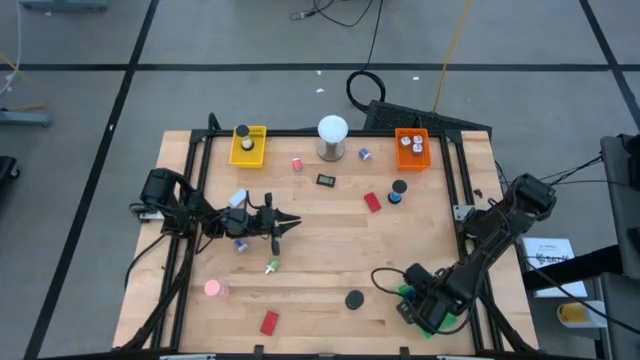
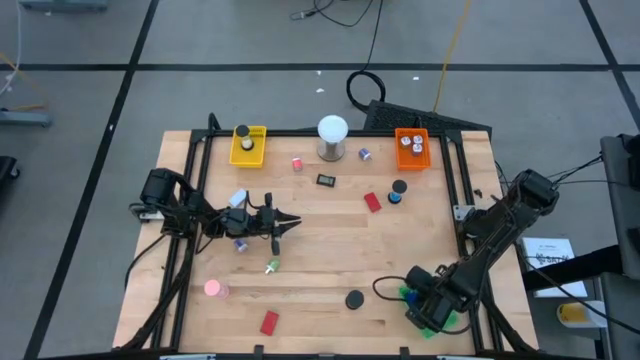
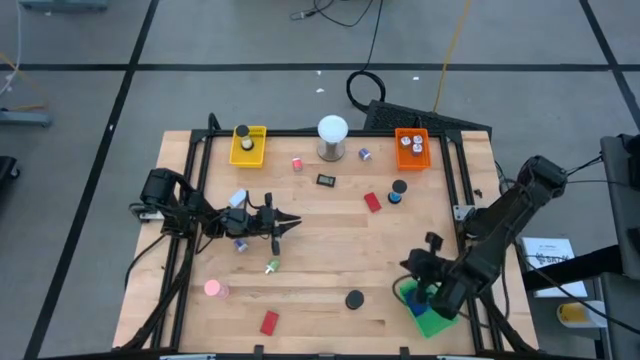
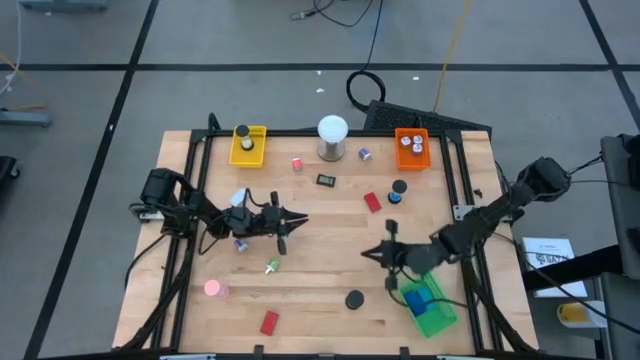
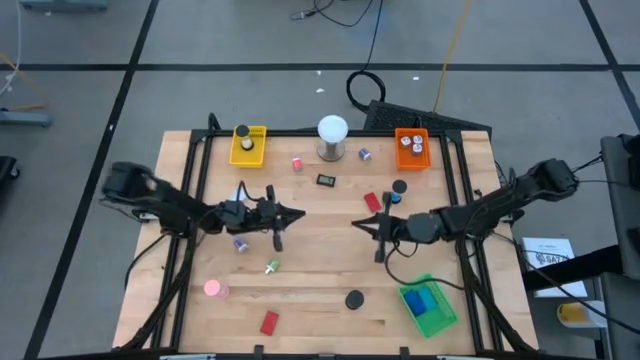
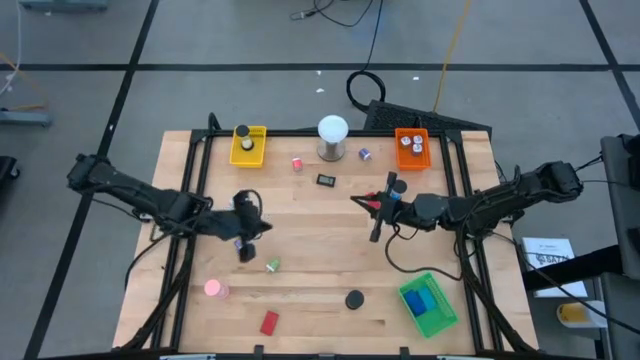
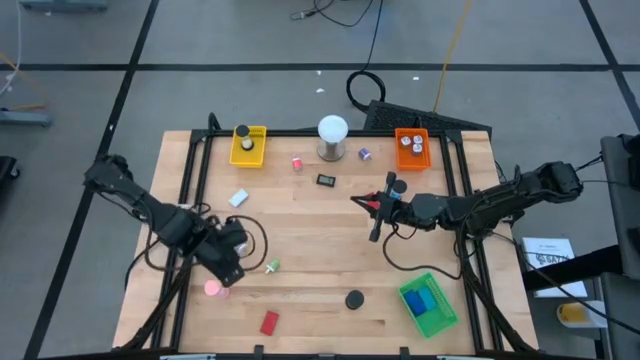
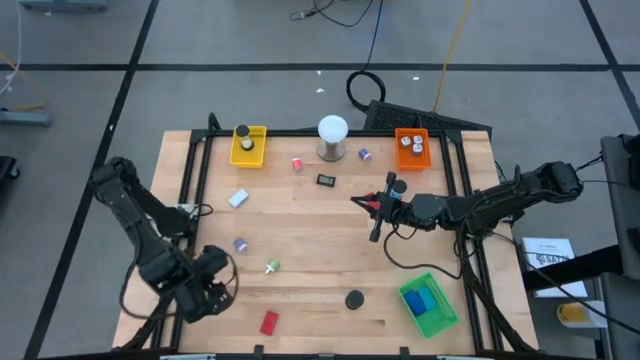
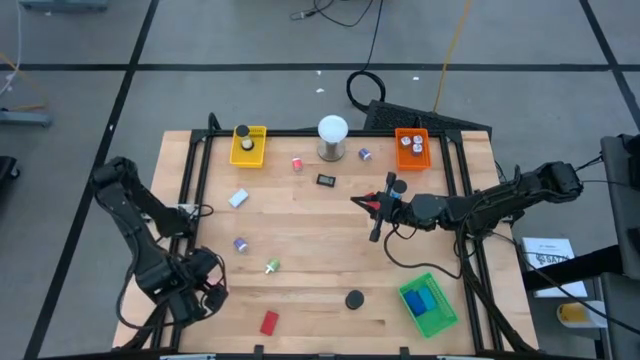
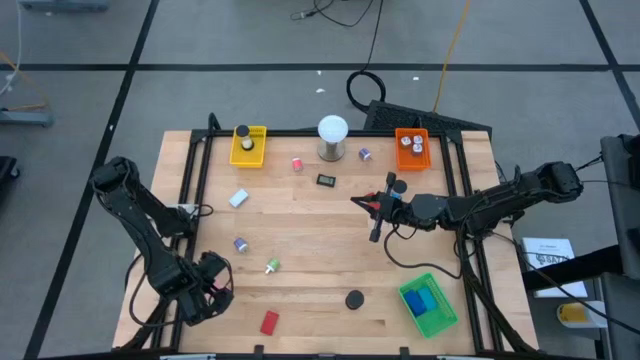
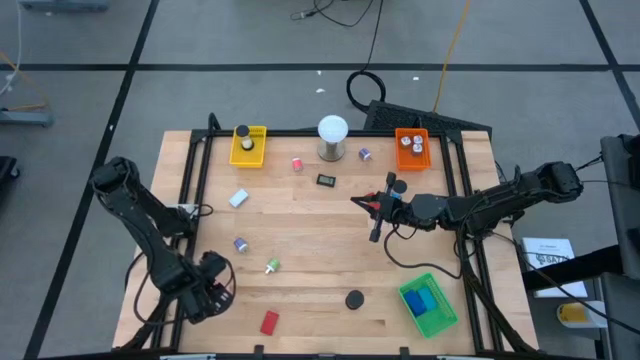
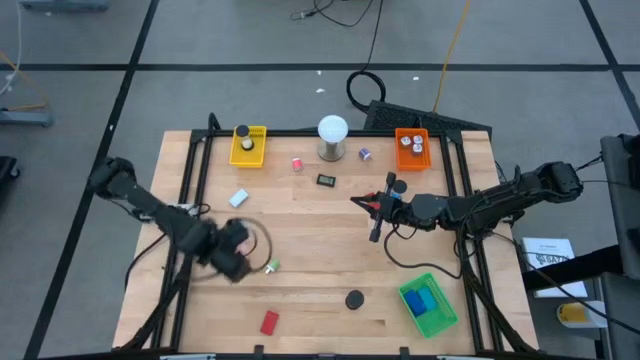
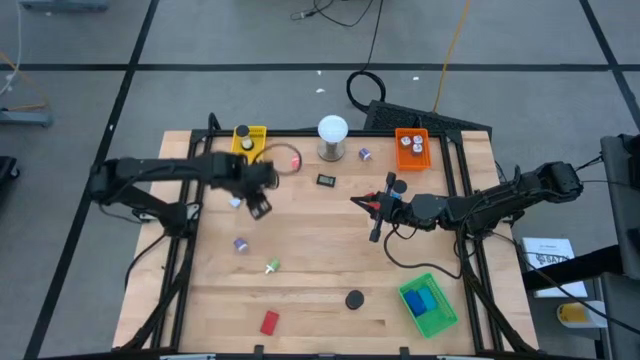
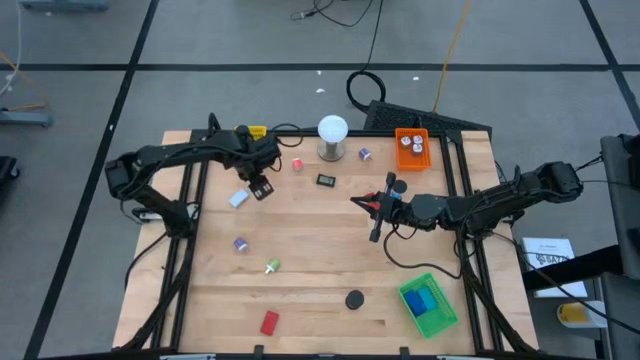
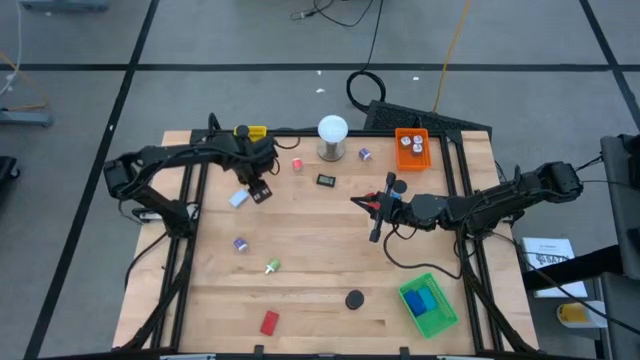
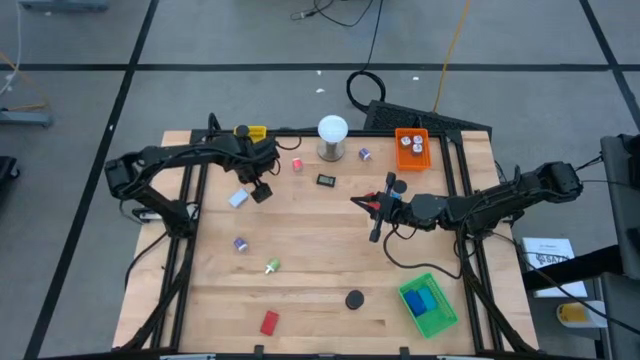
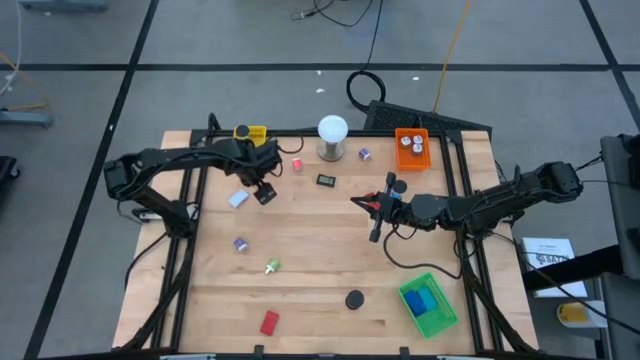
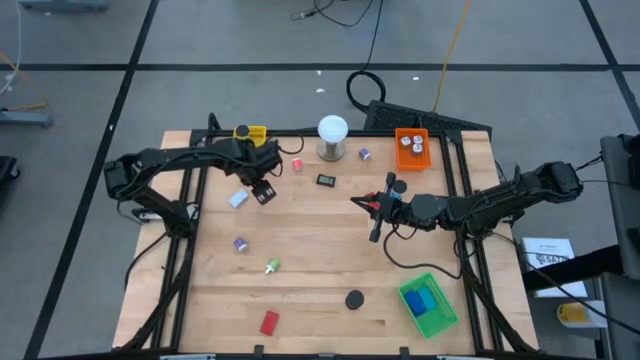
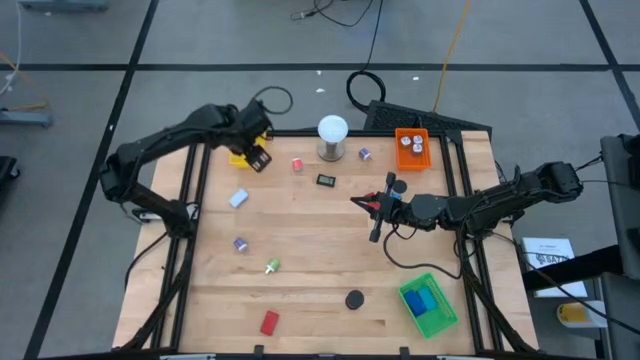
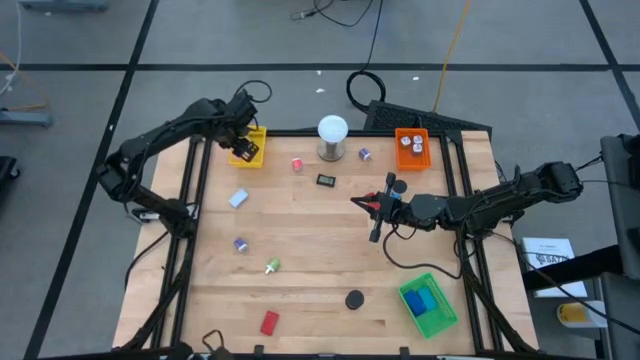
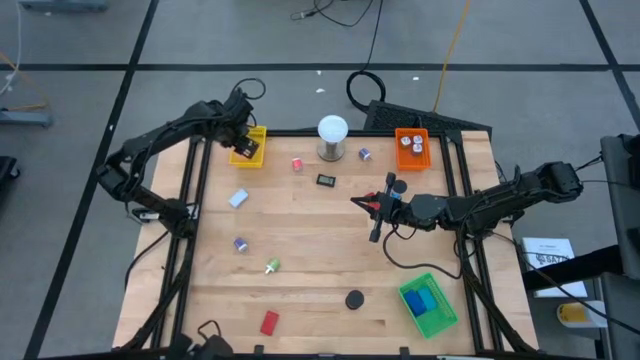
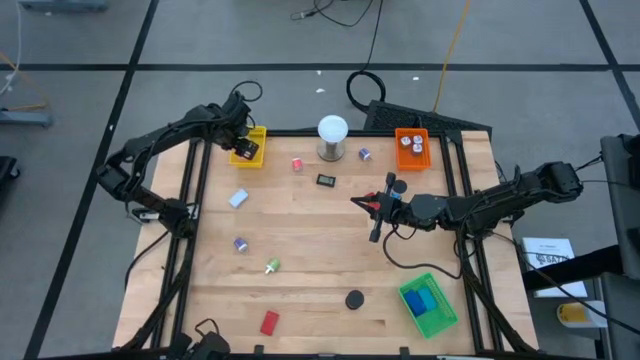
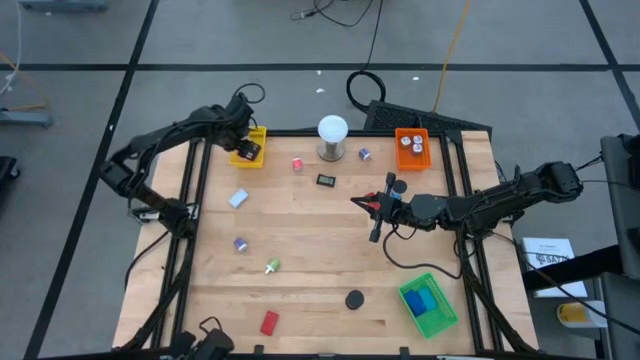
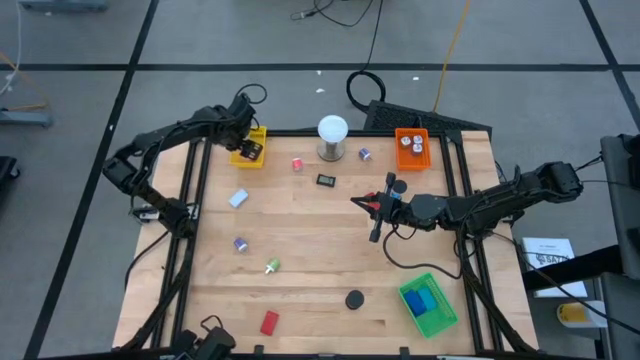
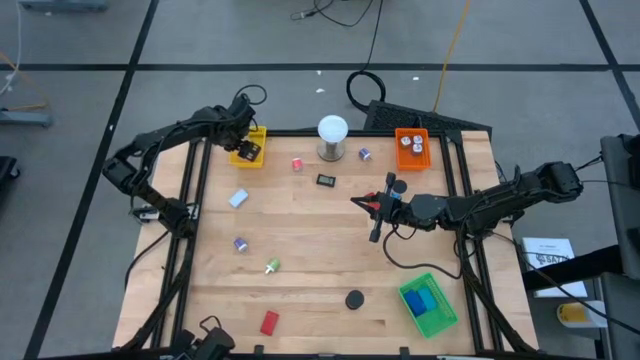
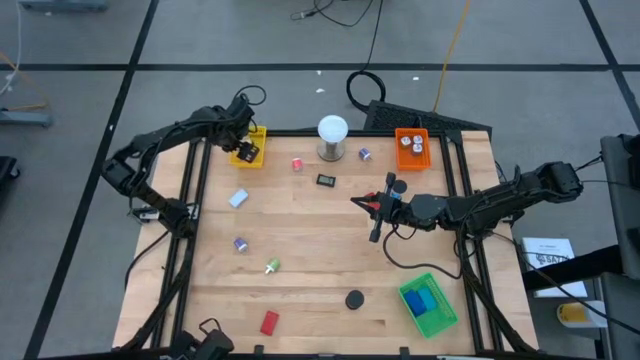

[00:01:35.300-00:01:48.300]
Task: Pick & Place Office items
Put the pink hour glass into the yellow bin
